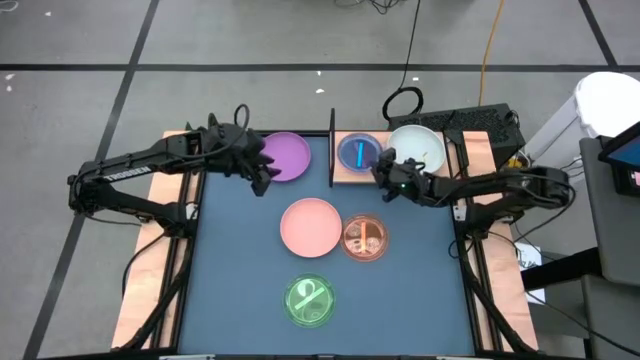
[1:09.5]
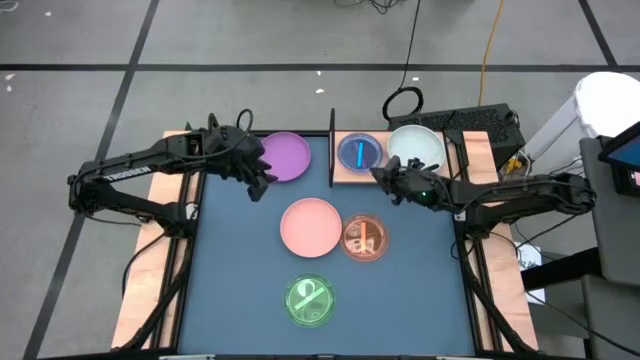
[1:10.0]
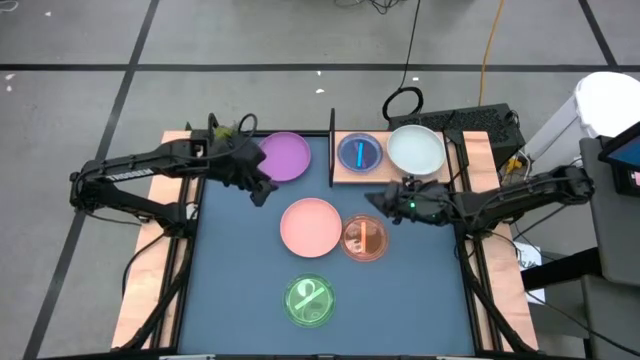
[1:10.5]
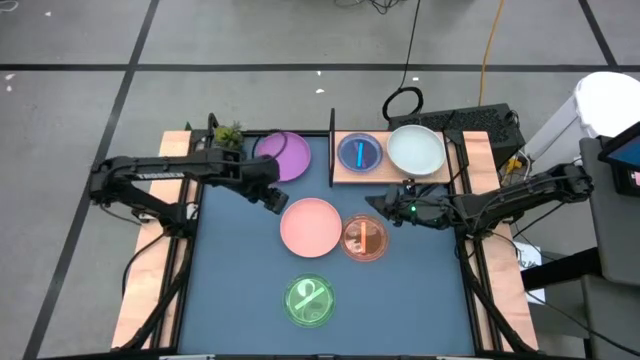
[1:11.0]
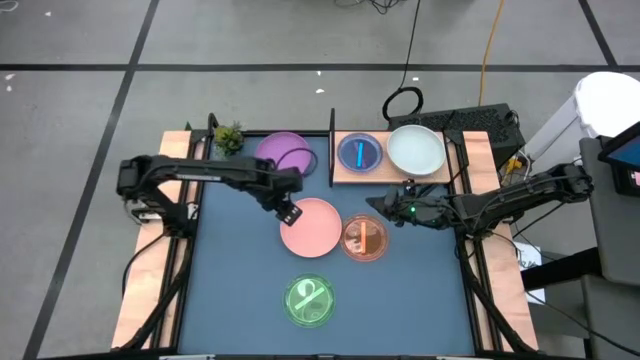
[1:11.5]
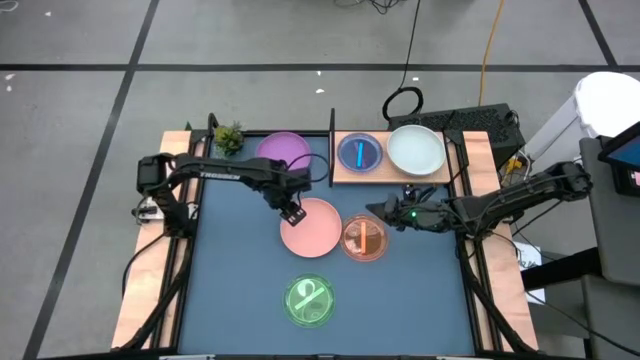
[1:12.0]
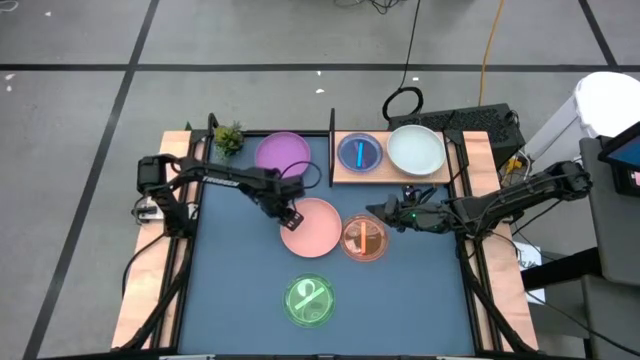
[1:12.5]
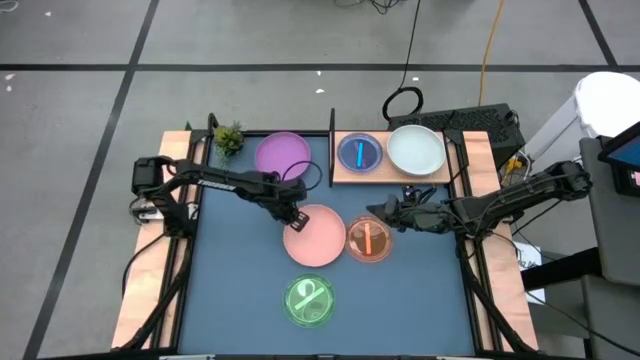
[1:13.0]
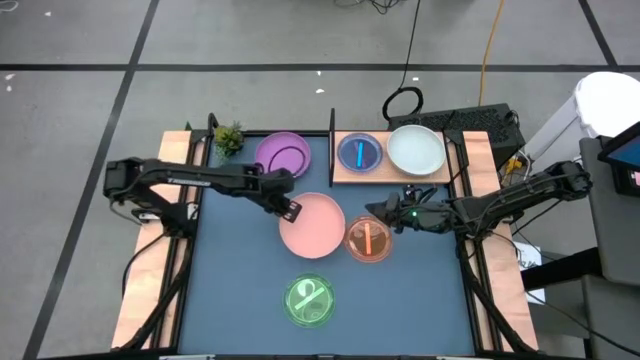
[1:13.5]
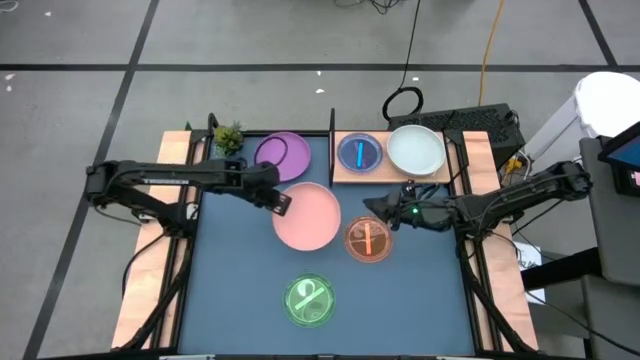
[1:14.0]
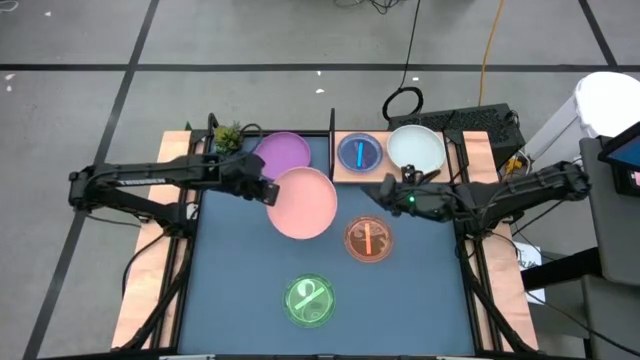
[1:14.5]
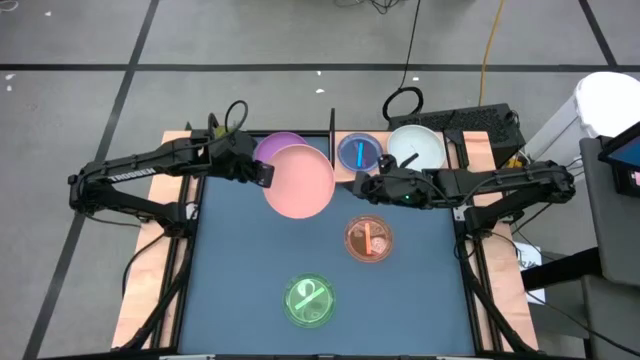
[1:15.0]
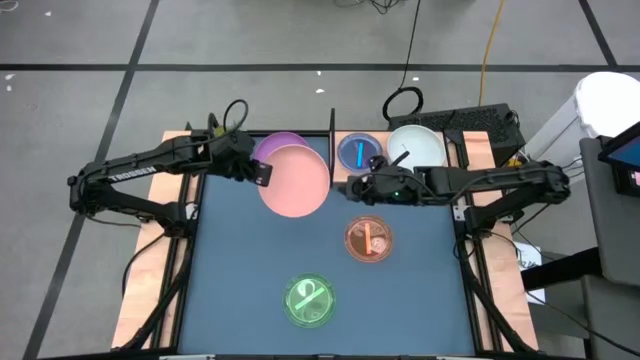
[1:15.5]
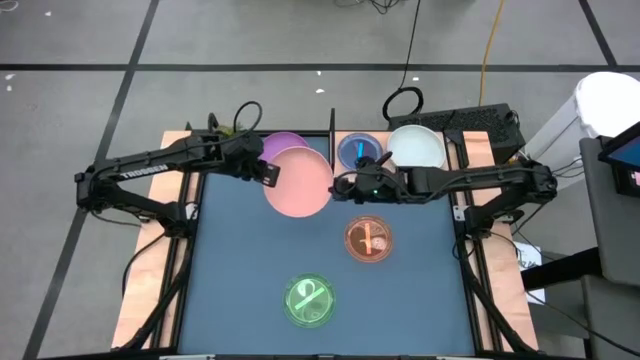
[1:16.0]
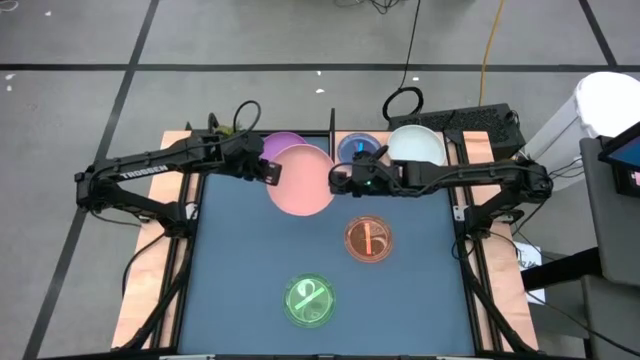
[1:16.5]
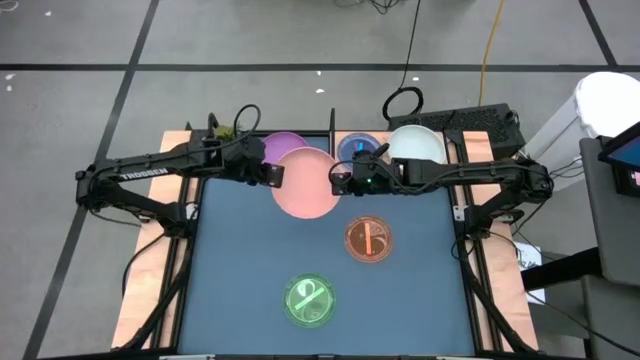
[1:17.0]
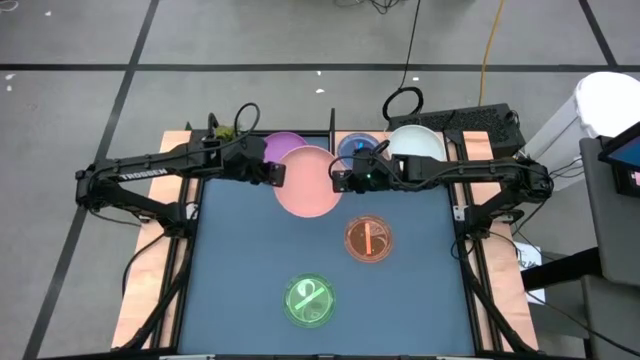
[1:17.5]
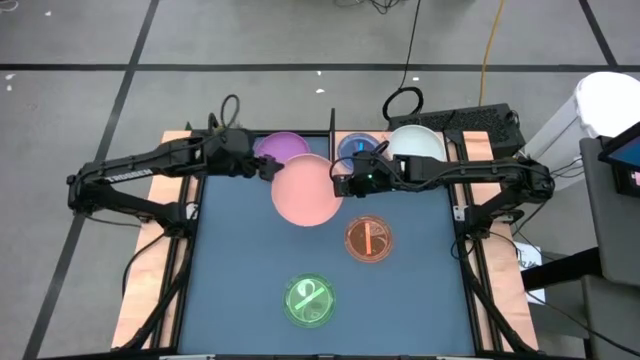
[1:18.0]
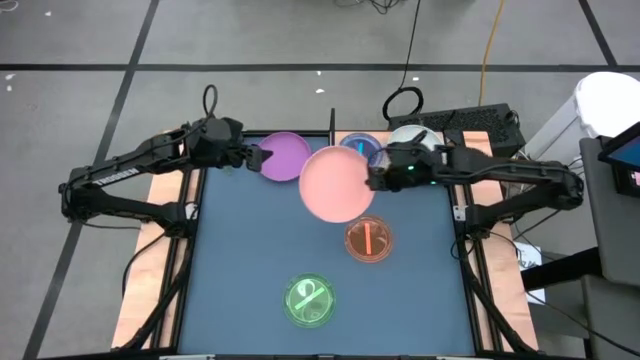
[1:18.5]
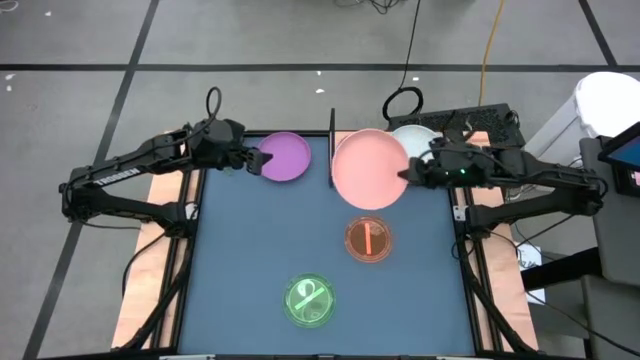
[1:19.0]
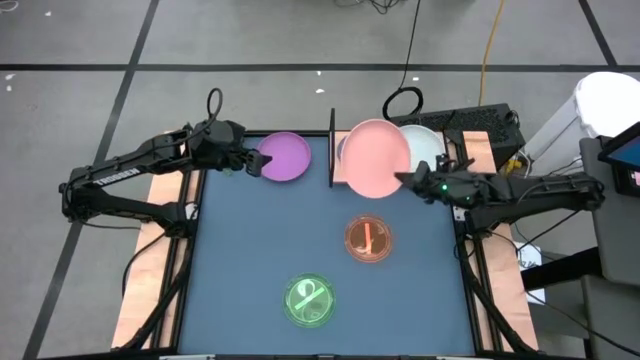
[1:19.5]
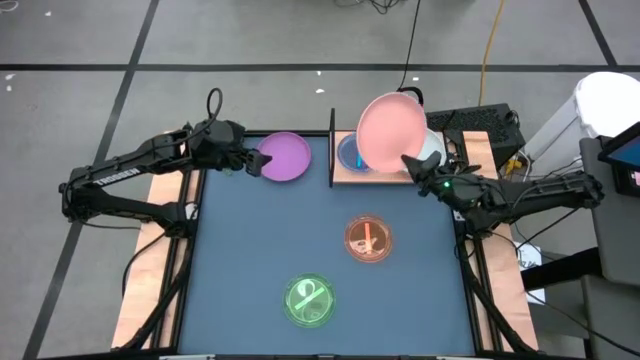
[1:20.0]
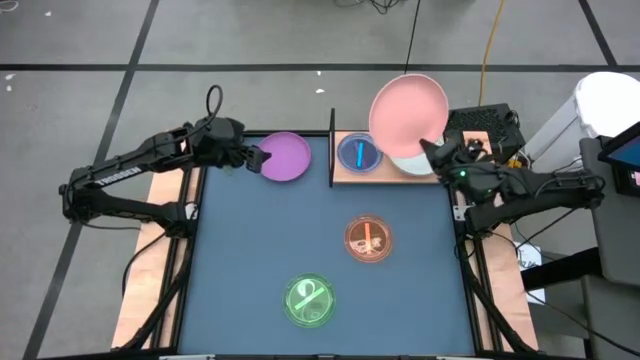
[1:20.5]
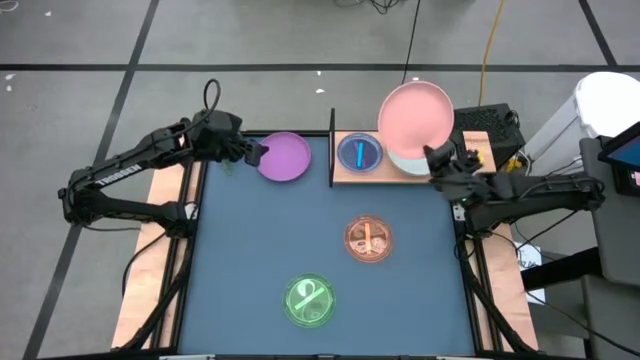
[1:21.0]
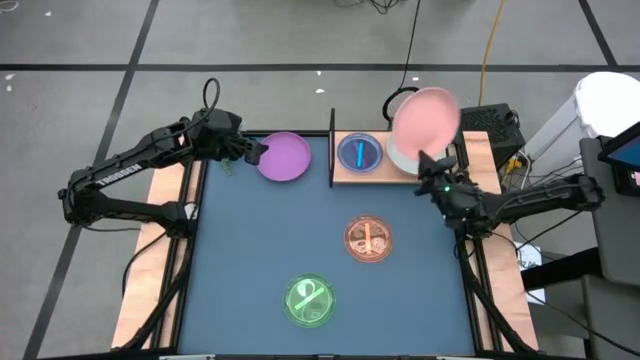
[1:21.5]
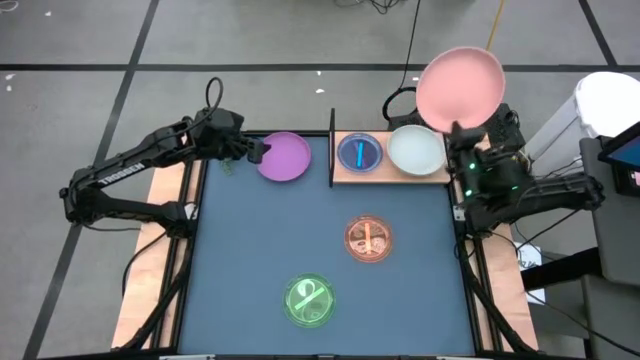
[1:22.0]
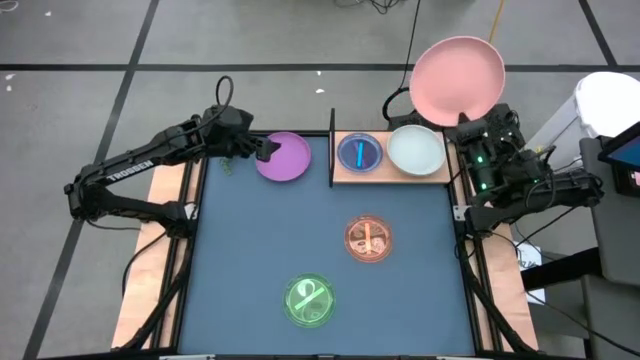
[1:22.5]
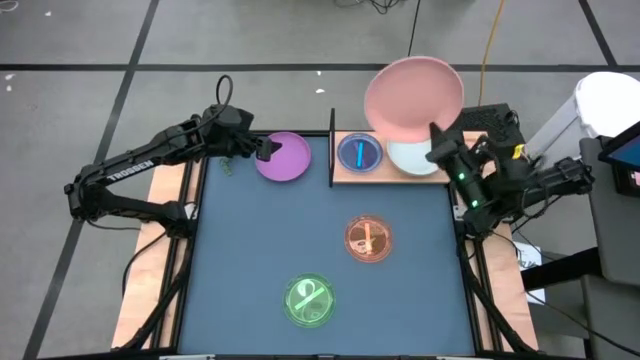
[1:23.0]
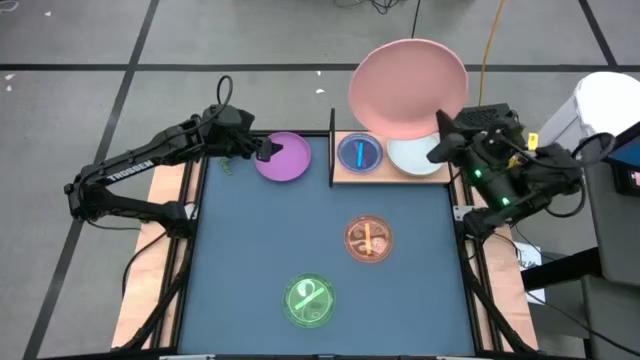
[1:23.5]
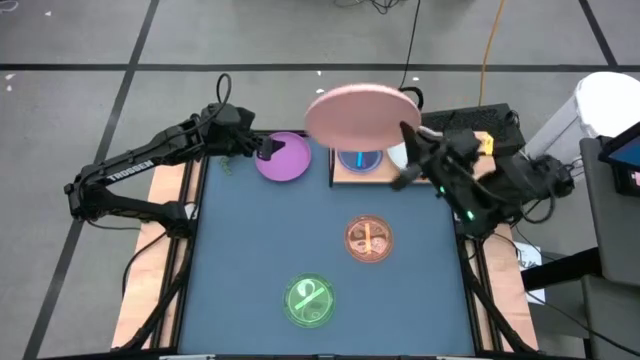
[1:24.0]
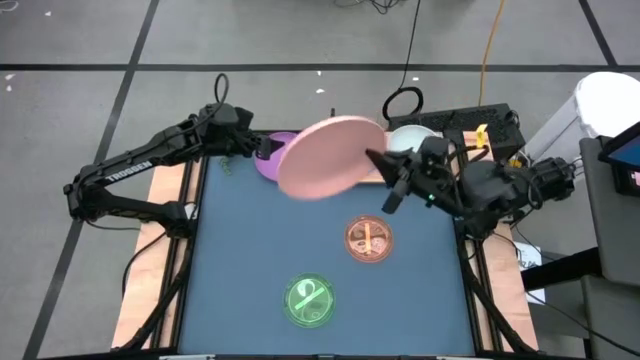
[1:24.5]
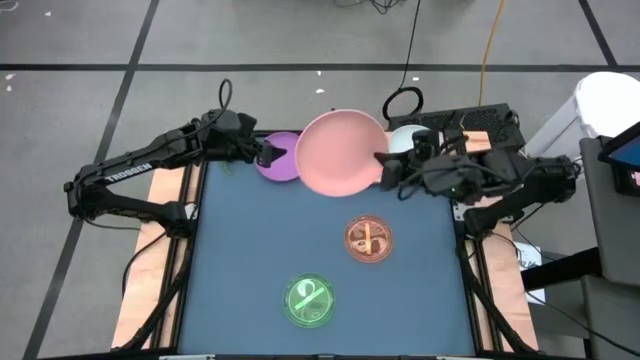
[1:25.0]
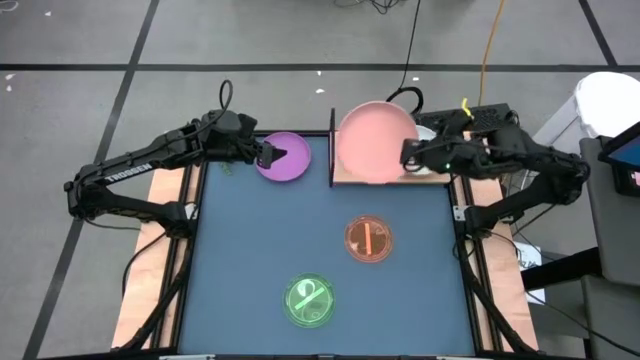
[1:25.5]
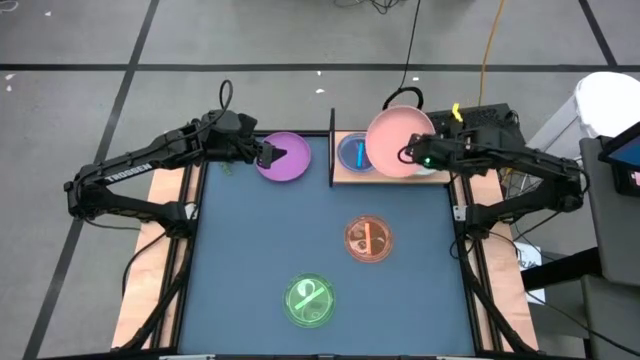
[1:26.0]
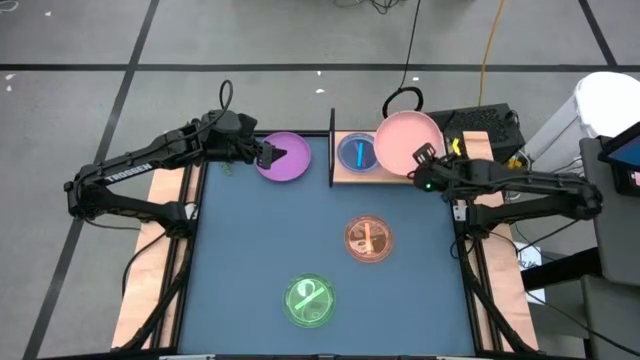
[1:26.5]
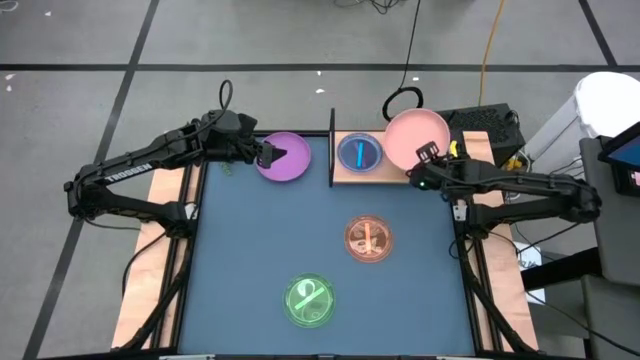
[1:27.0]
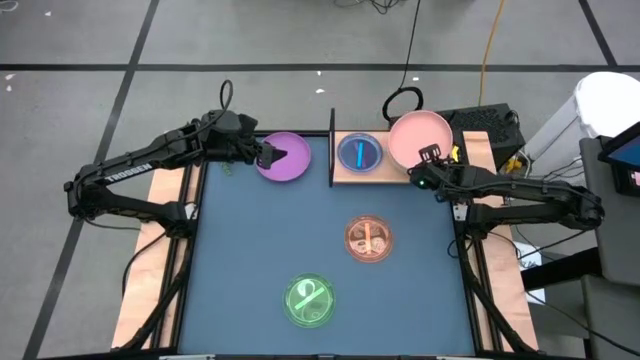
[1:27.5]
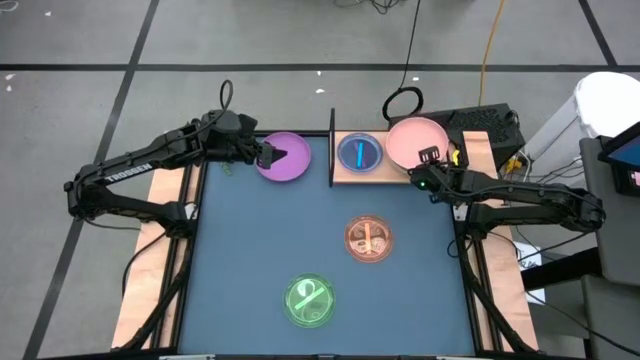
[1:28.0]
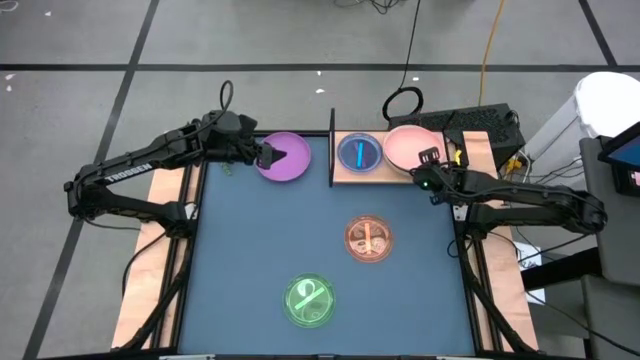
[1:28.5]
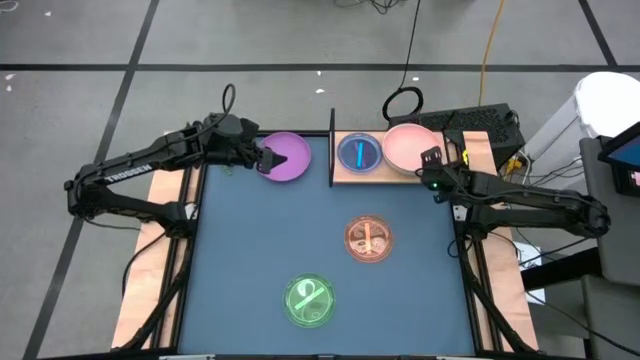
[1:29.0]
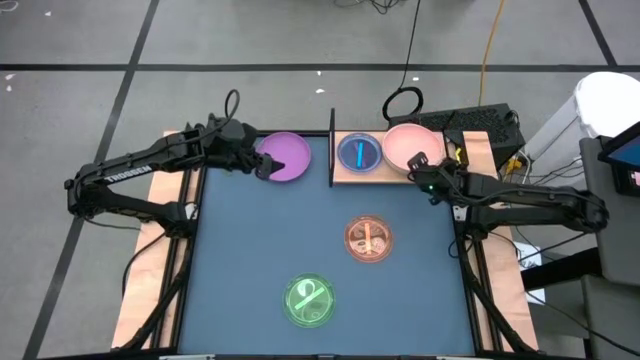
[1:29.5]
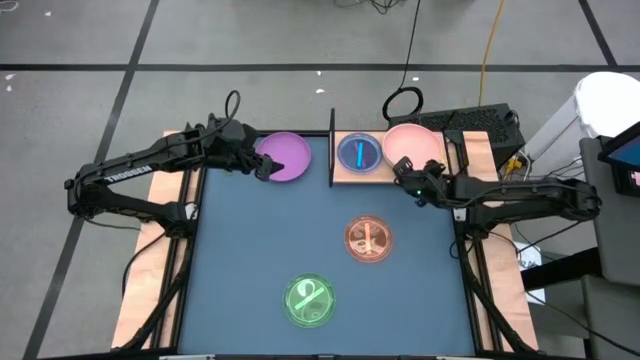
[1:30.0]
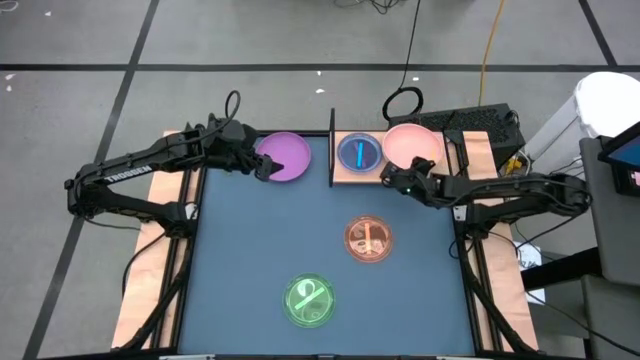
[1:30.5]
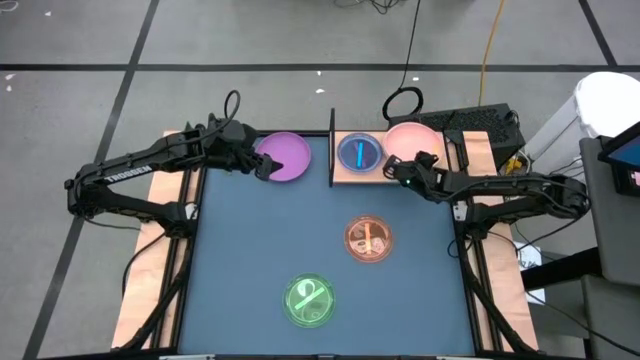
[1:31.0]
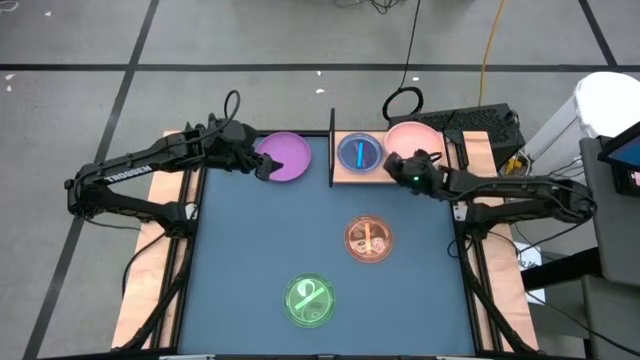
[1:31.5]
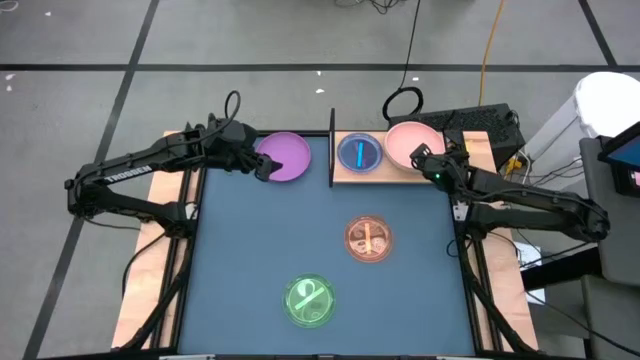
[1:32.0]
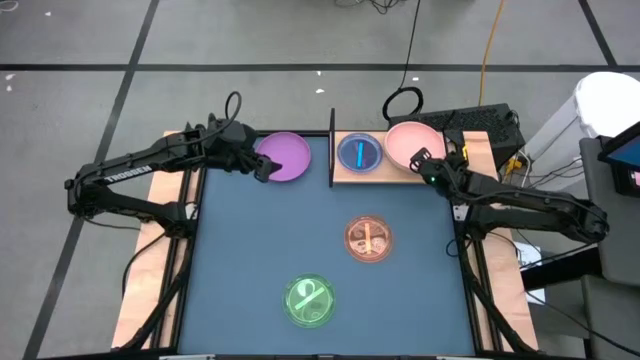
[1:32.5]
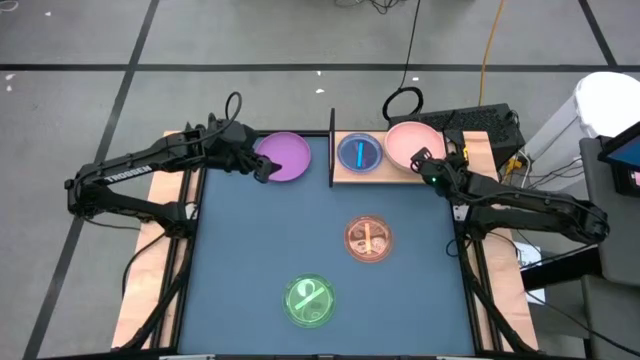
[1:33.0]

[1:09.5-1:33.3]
Task: Place and stack plates onto a shelf
Stack the light brown plate on the light blue plate on the shelf
